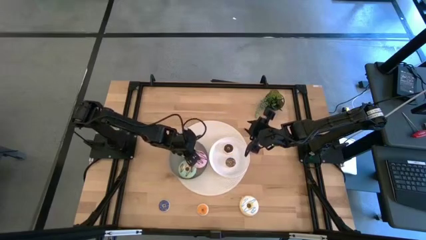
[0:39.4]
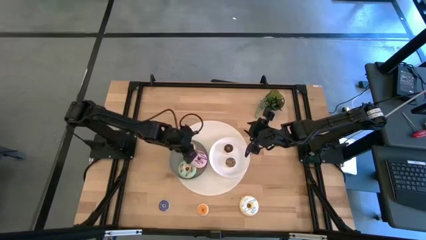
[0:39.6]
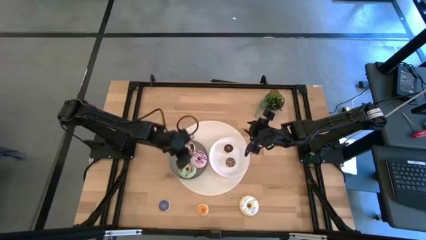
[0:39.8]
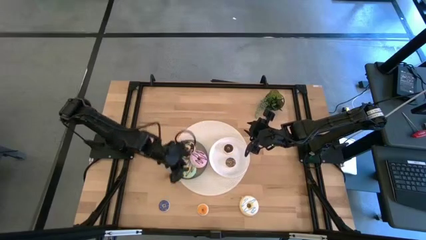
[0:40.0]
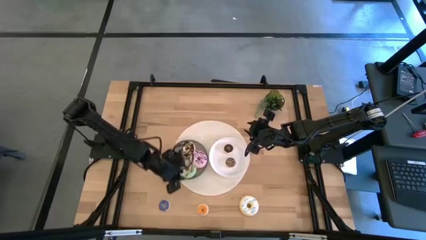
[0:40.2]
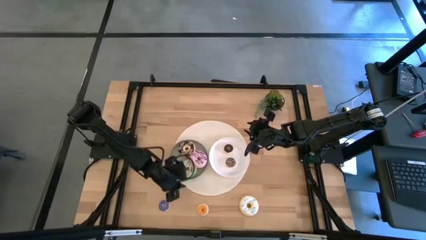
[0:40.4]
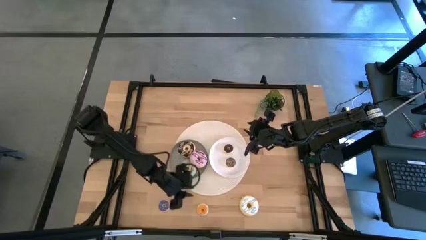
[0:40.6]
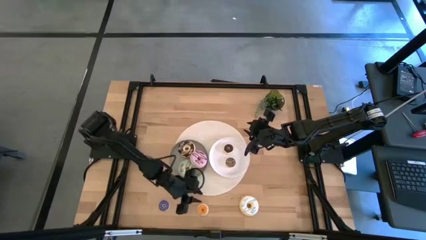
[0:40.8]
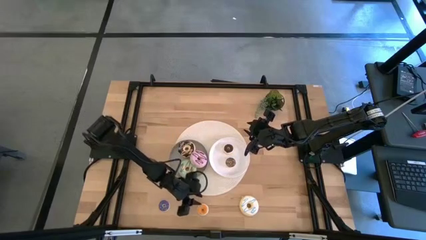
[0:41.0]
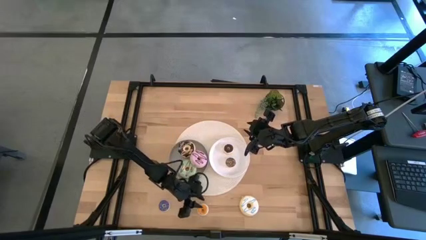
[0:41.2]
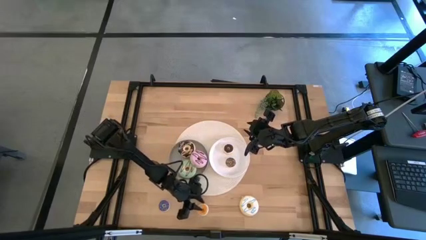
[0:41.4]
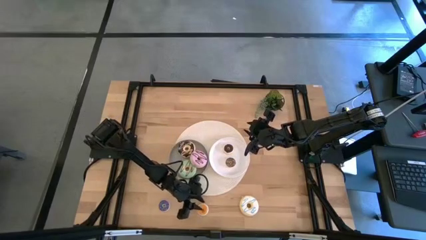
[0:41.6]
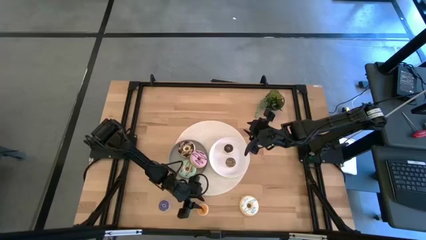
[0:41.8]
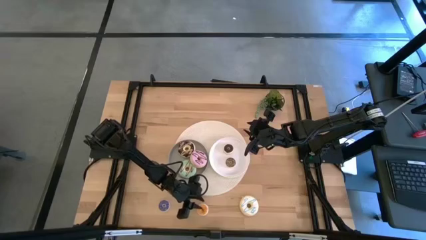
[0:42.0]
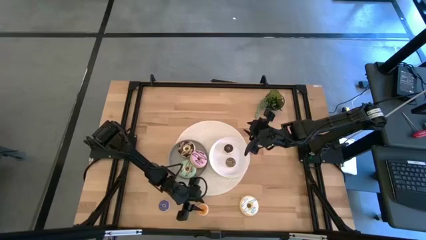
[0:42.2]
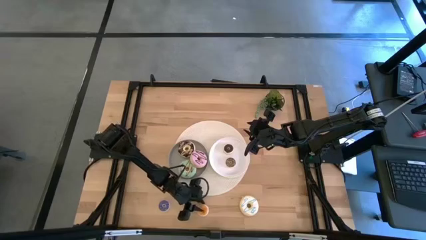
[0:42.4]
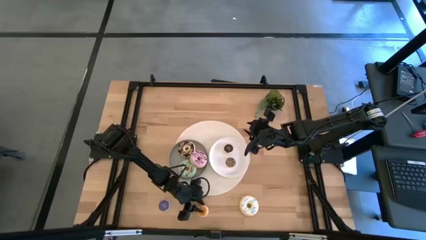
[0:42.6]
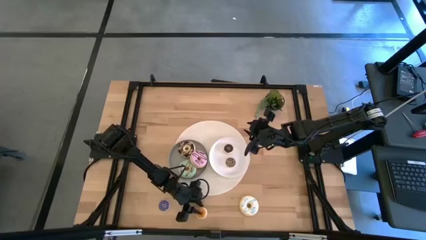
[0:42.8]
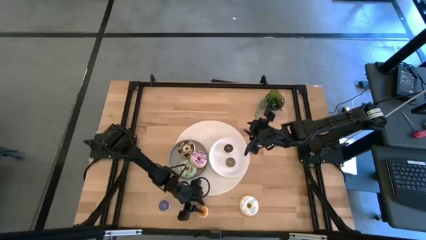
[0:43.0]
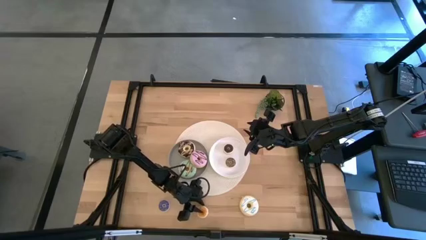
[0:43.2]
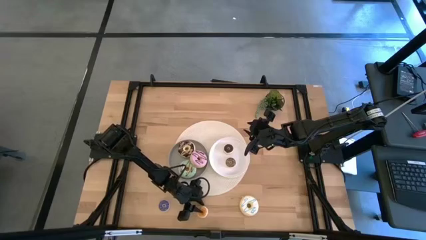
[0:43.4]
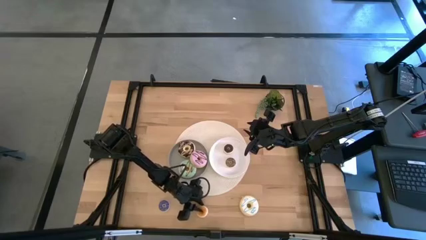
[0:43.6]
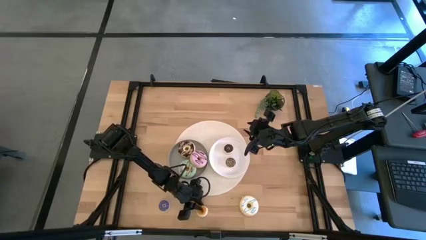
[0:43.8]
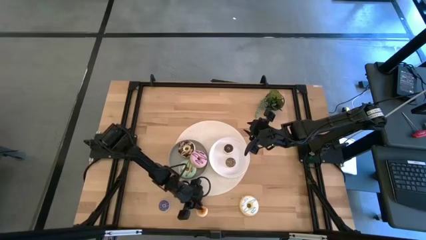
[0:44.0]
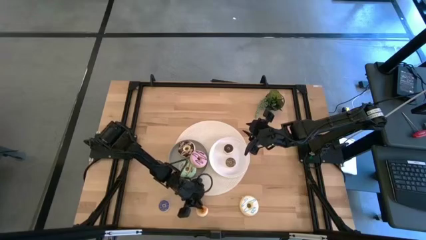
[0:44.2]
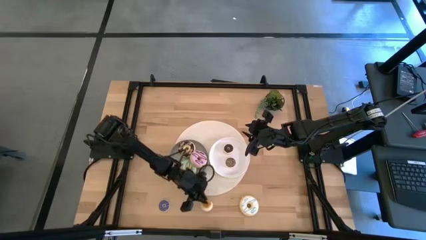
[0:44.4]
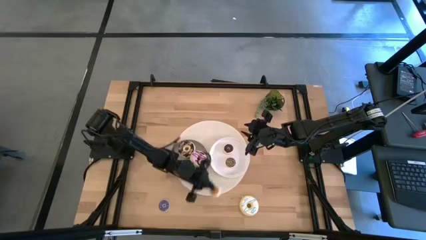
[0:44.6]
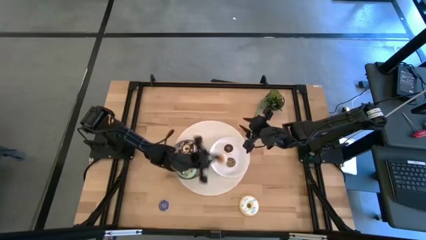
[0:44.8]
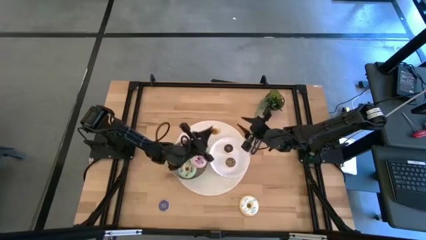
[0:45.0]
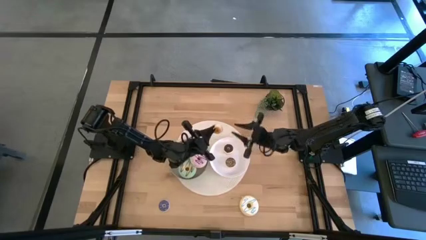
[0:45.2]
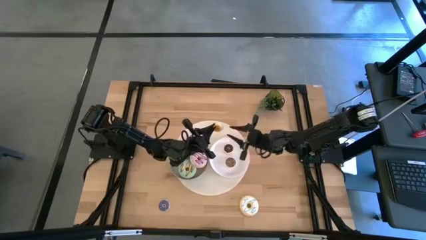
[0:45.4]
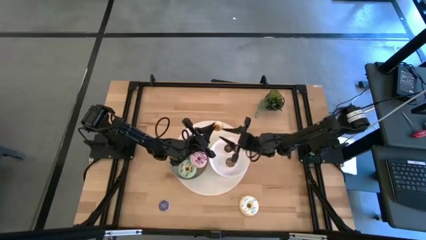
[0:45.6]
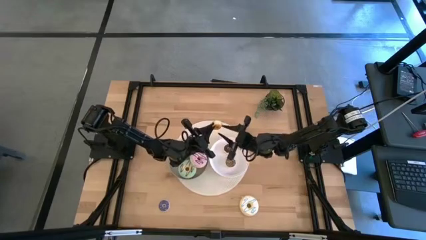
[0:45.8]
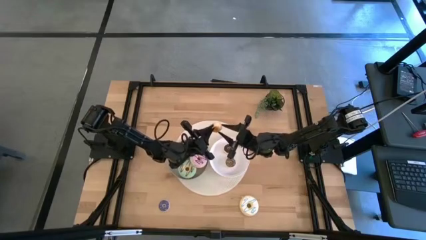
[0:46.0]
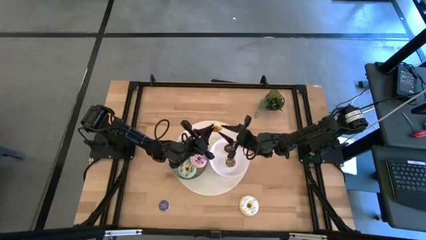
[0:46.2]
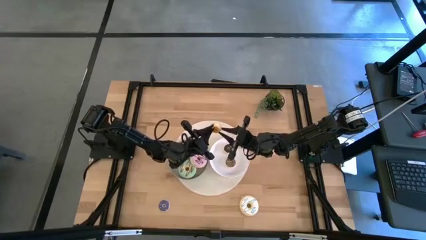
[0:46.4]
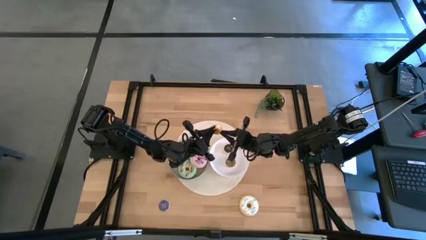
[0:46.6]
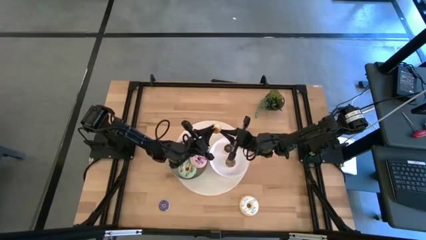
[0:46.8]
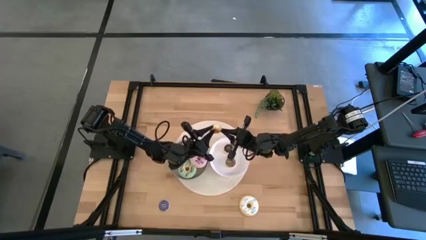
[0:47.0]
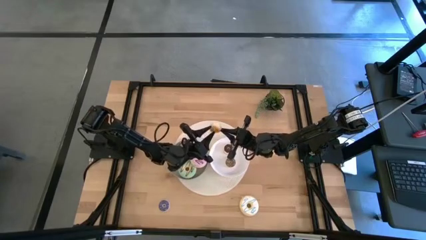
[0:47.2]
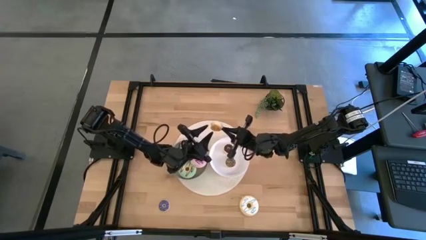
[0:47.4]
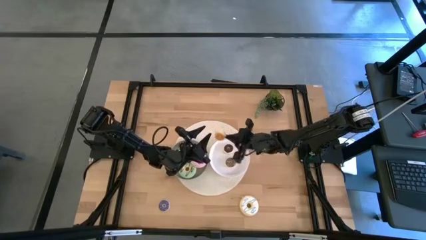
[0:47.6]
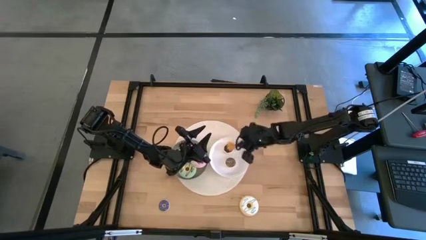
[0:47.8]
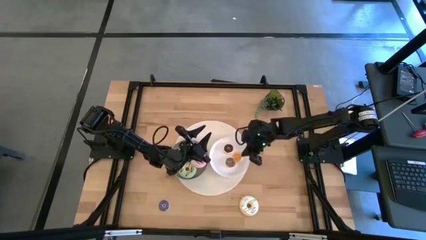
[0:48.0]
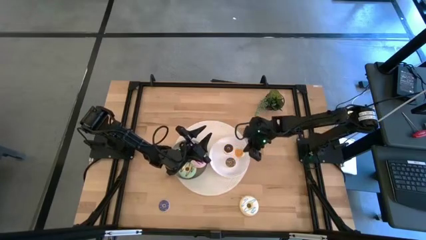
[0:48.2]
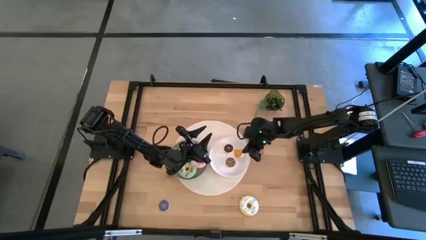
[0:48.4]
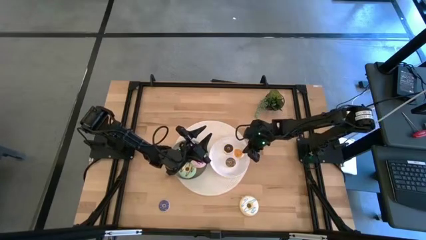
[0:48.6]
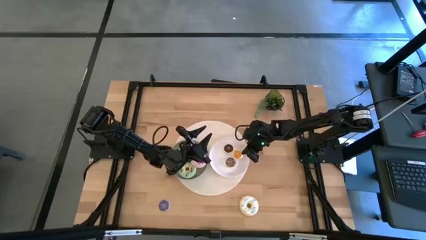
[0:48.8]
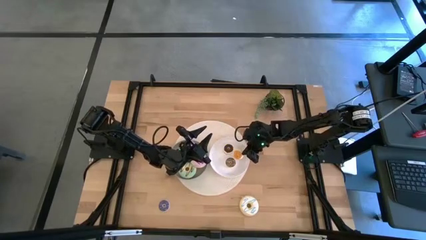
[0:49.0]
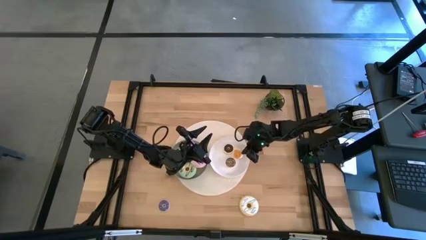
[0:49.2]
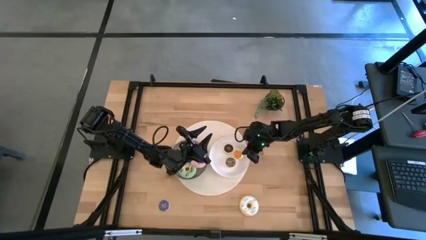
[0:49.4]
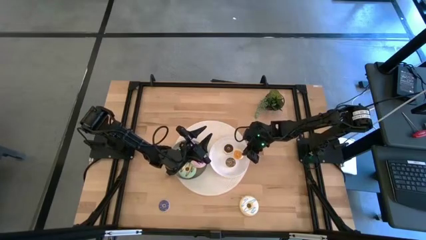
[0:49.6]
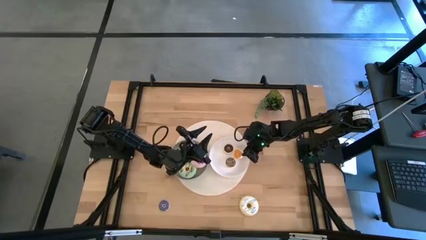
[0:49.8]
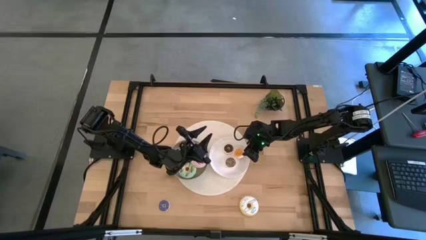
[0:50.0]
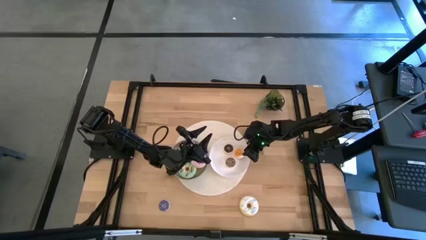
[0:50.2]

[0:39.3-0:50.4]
Task: Pick & Place donuts
Put the small orange donut on the white plate

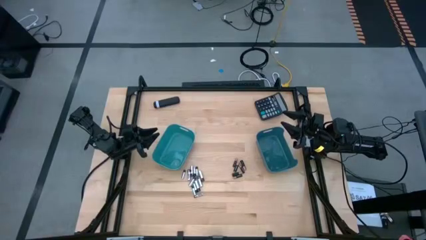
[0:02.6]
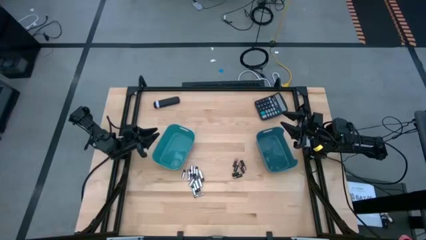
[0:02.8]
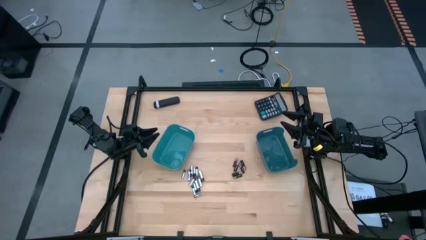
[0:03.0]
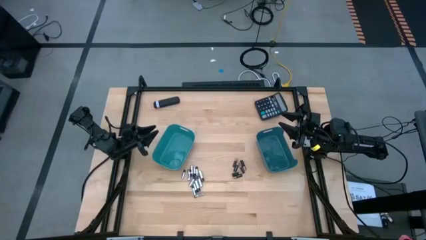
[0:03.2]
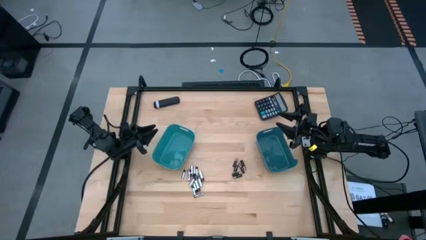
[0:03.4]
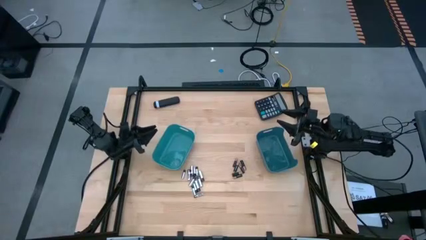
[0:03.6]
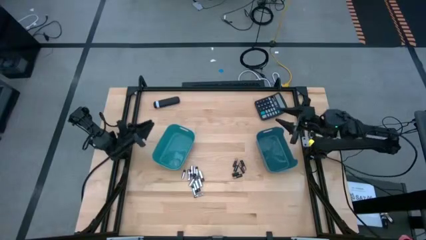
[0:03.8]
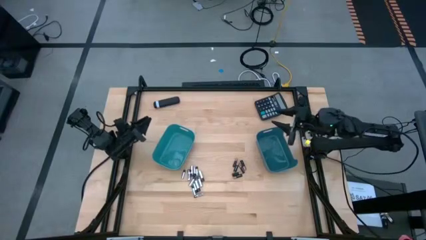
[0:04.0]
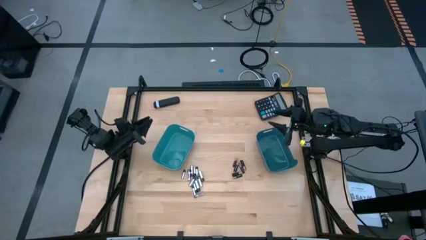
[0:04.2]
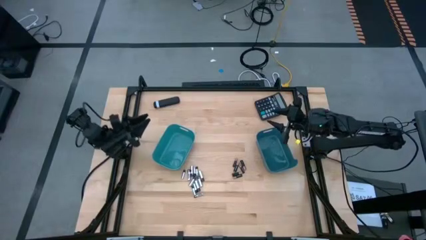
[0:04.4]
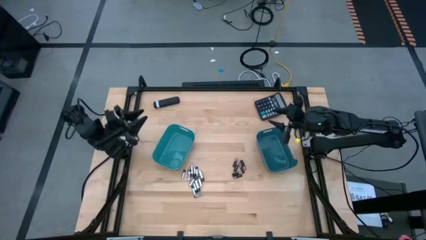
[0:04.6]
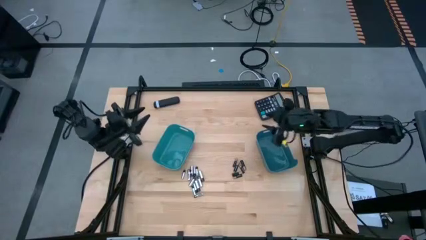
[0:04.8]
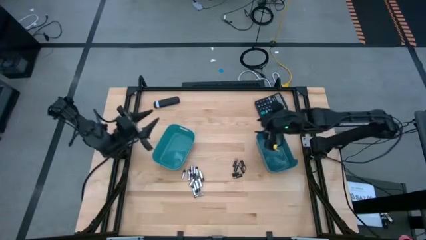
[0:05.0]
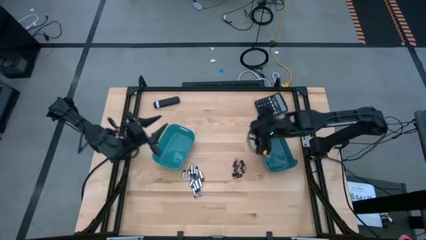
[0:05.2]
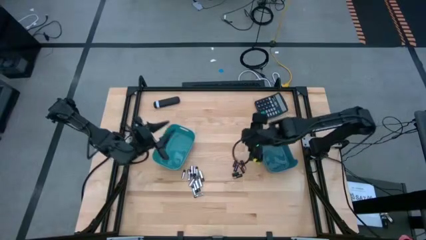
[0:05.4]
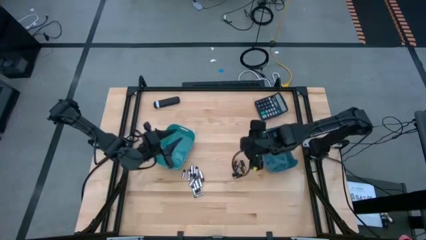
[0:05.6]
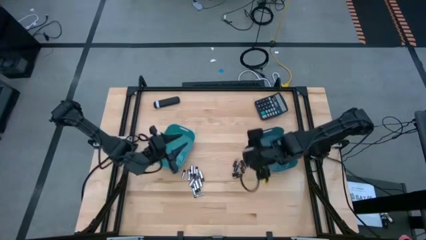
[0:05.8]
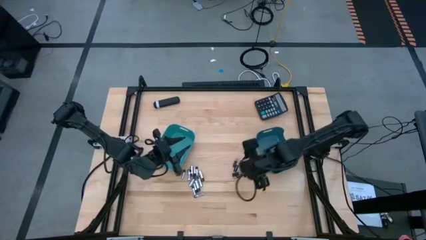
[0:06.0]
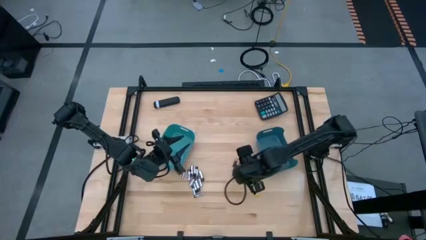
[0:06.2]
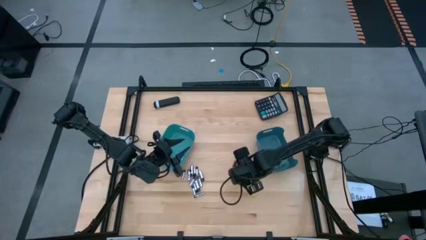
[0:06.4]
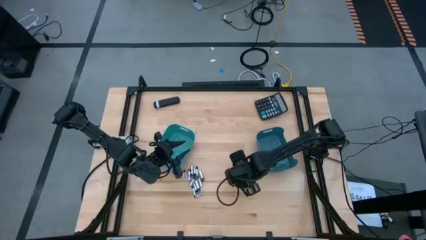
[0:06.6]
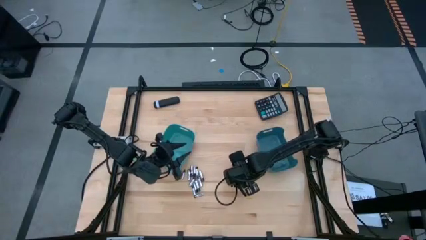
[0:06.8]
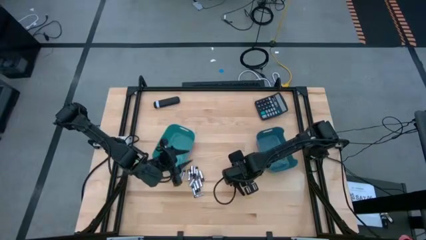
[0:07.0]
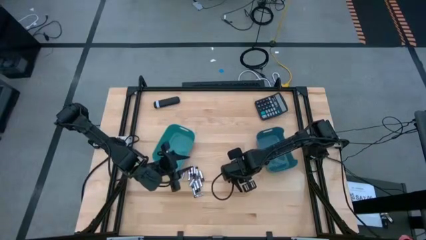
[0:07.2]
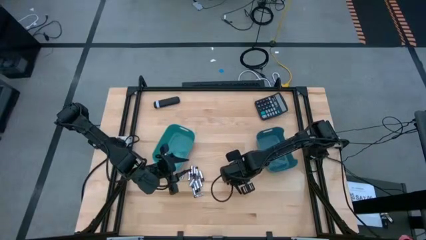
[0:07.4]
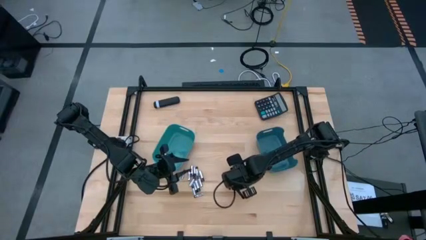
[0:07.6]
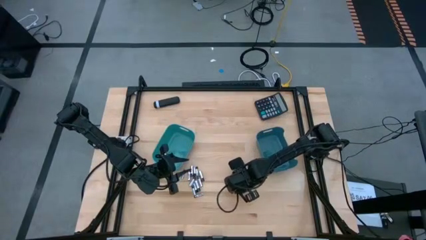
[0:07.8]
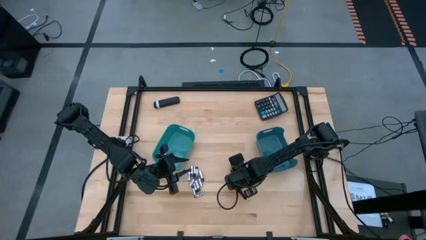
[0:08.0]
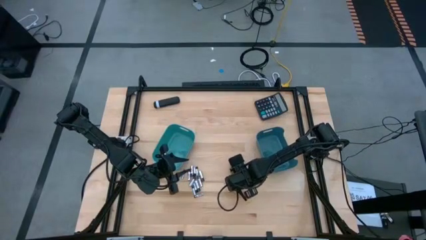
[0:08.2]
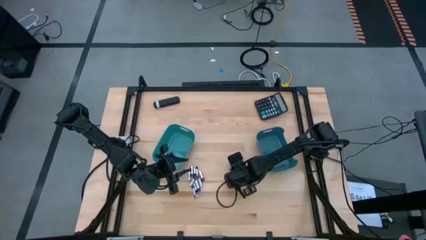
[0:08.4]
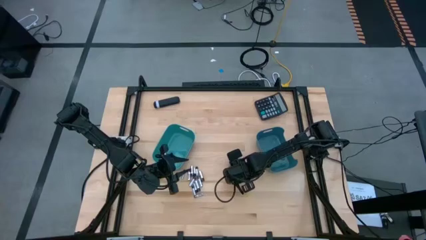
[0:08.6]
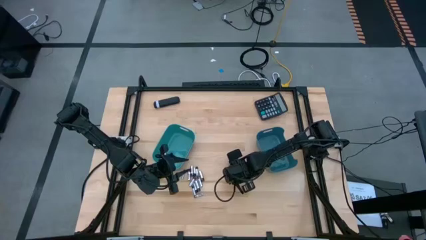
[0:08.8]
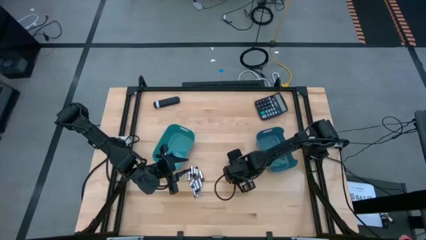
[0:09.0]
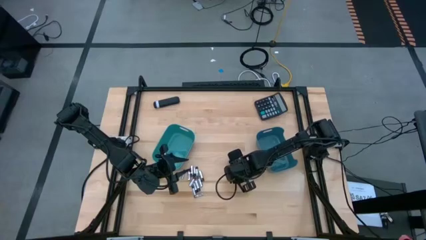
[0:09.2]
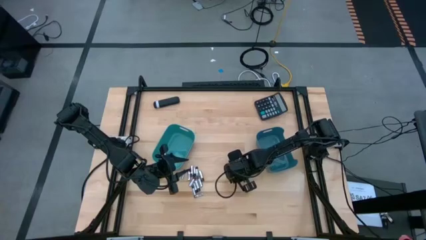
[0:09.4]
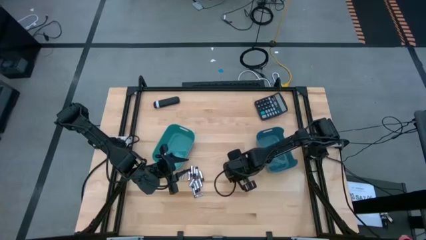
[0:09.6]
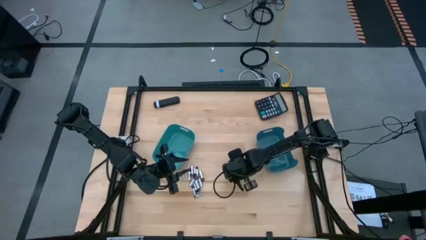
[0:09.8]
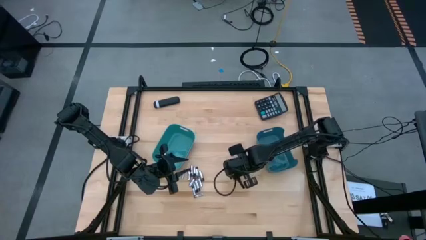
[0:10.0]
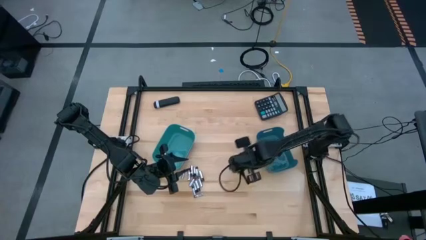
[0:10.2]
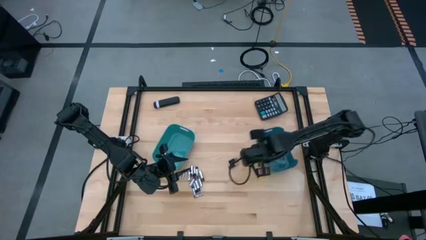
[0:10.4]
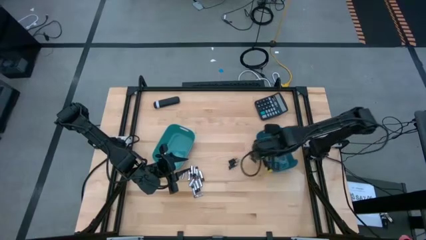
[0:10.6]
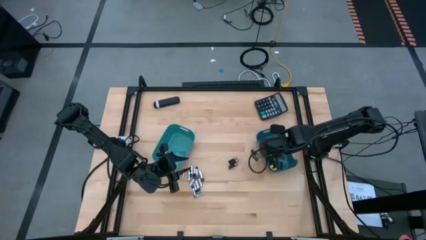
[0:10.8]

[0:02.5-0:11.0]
Task: Sort batteries
Put the black battery into the blue bin
